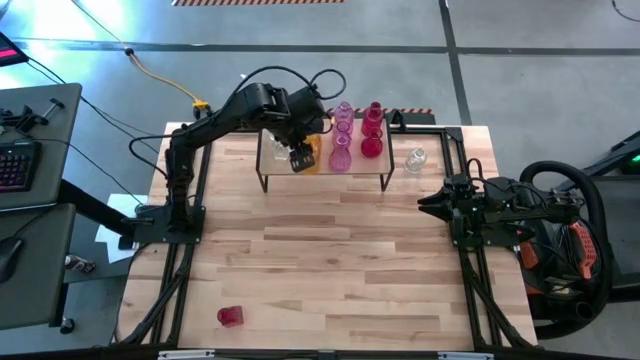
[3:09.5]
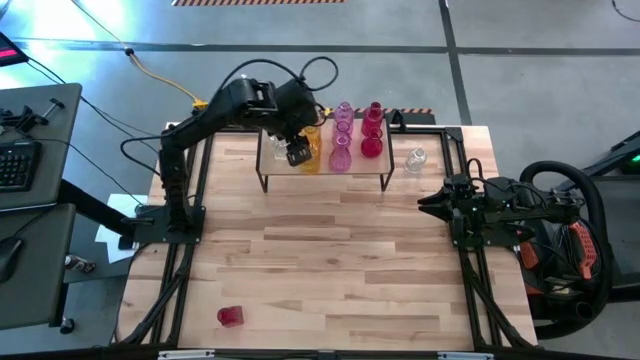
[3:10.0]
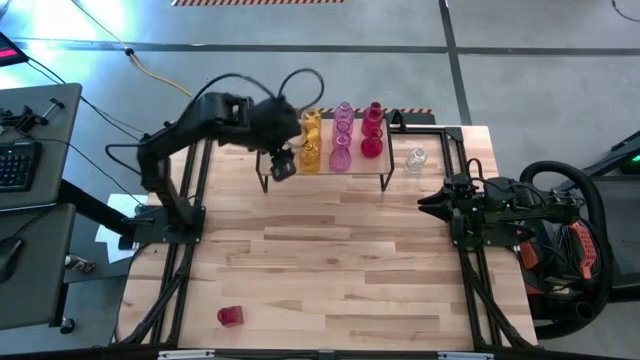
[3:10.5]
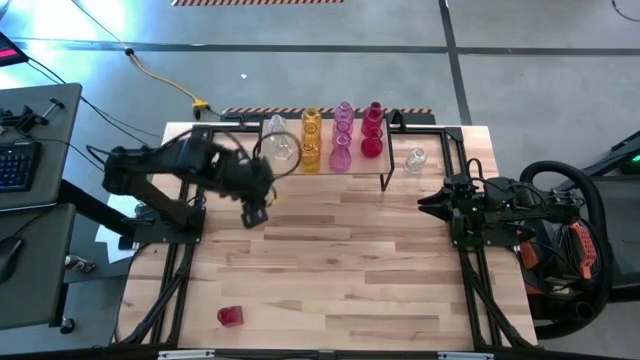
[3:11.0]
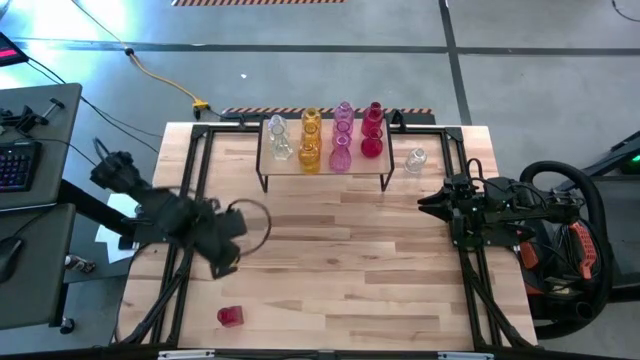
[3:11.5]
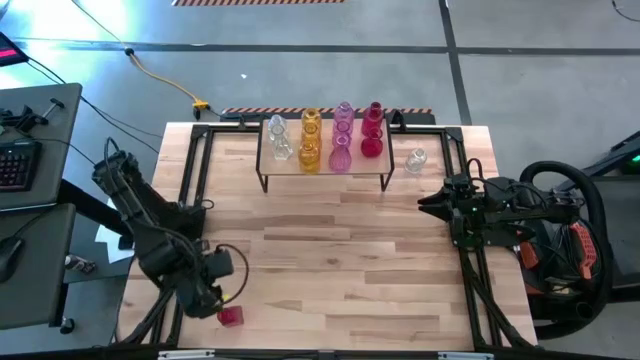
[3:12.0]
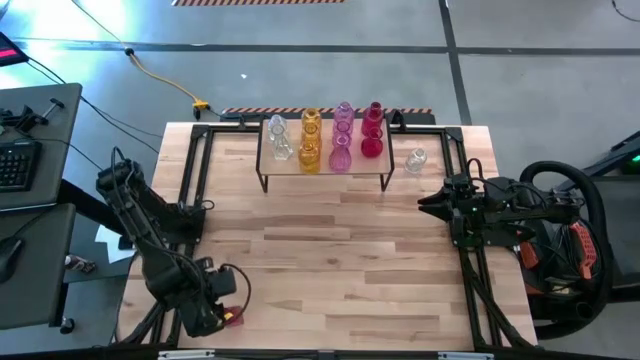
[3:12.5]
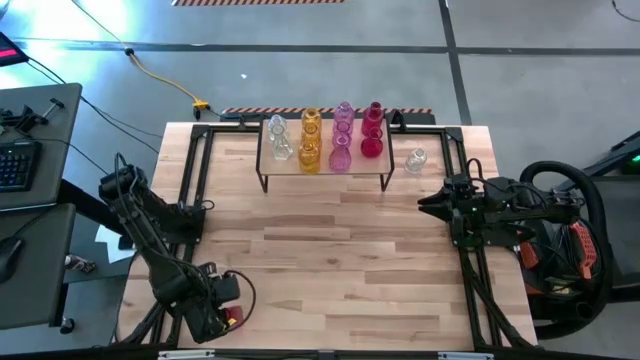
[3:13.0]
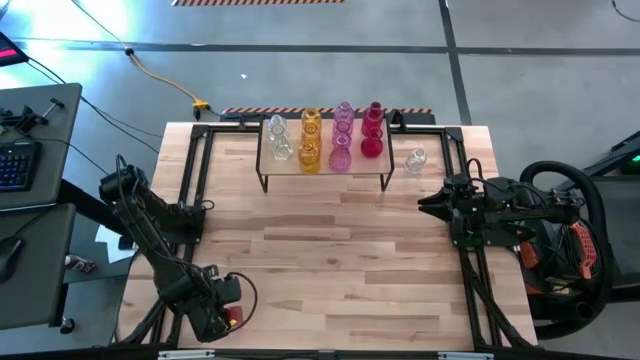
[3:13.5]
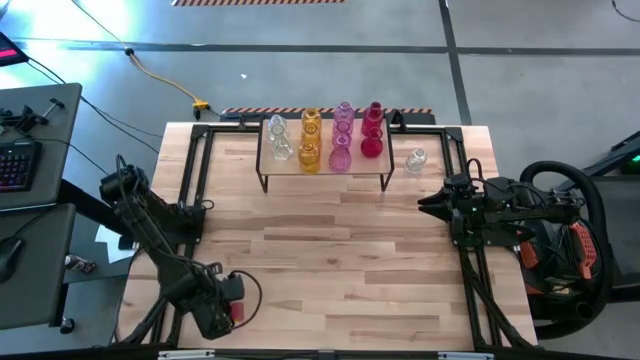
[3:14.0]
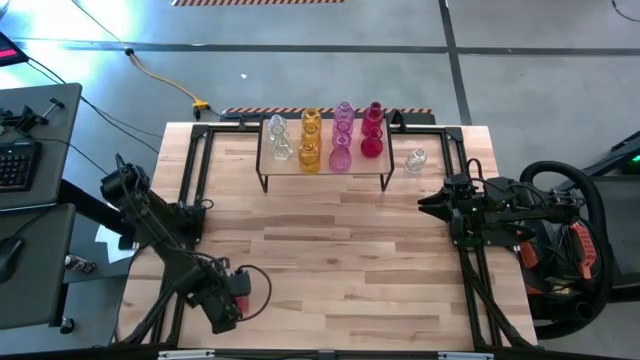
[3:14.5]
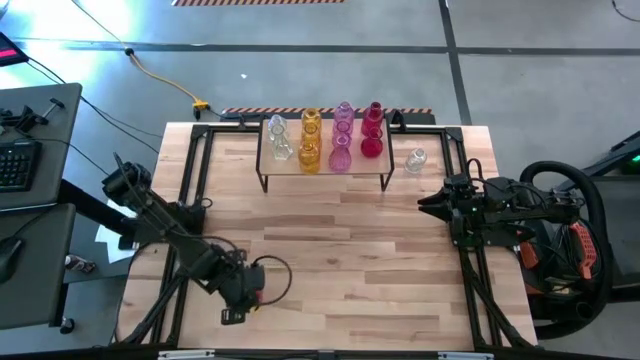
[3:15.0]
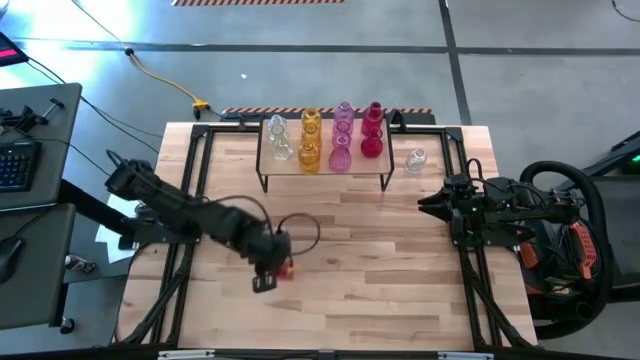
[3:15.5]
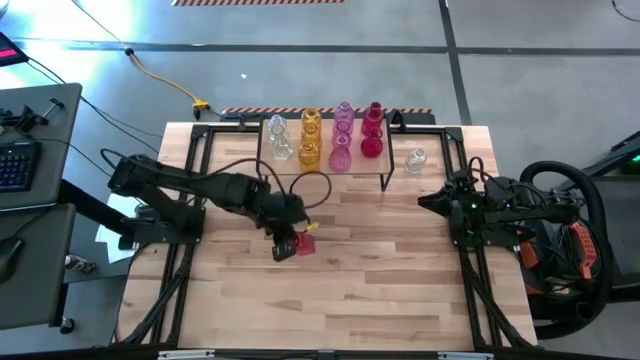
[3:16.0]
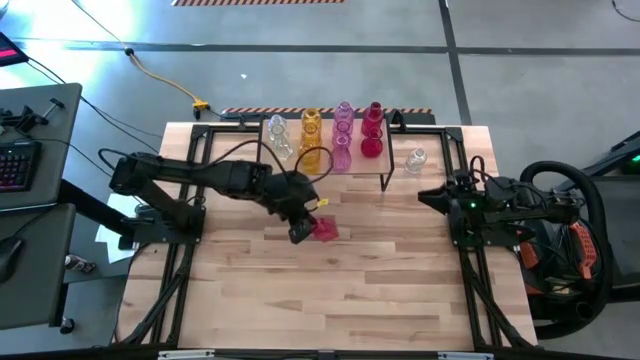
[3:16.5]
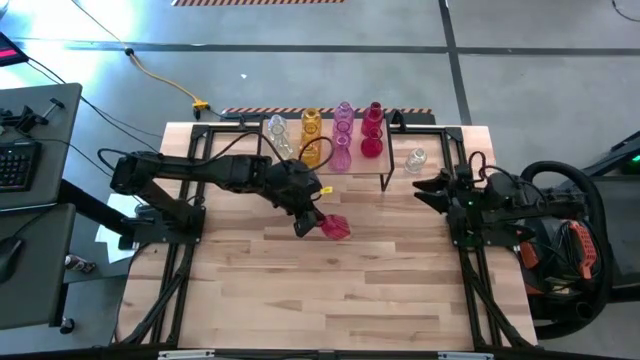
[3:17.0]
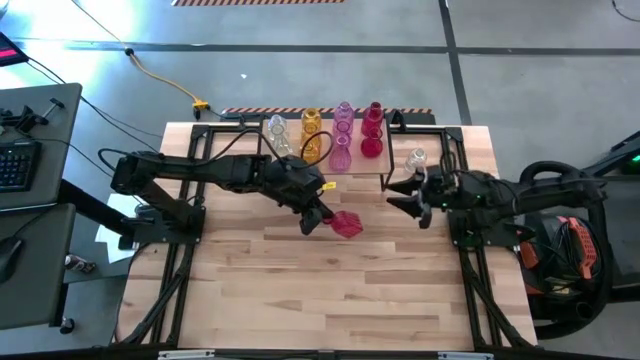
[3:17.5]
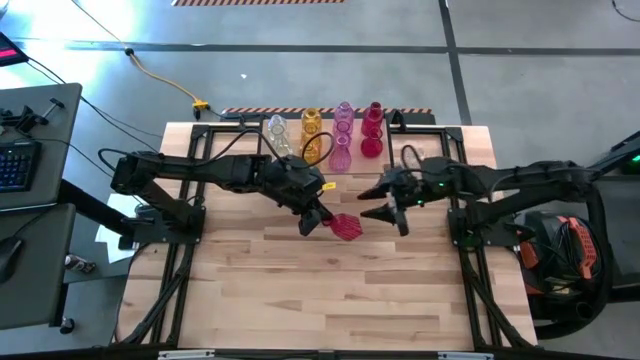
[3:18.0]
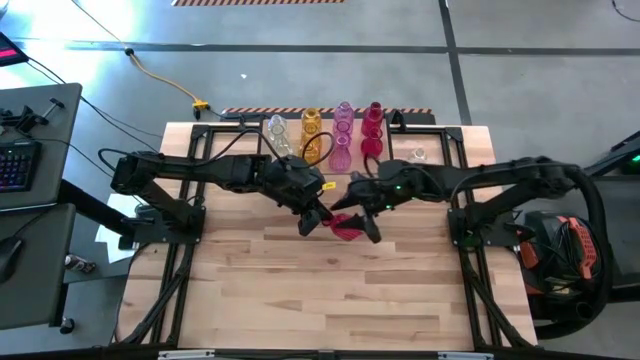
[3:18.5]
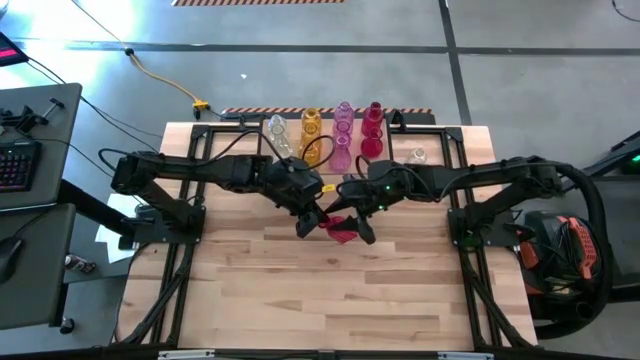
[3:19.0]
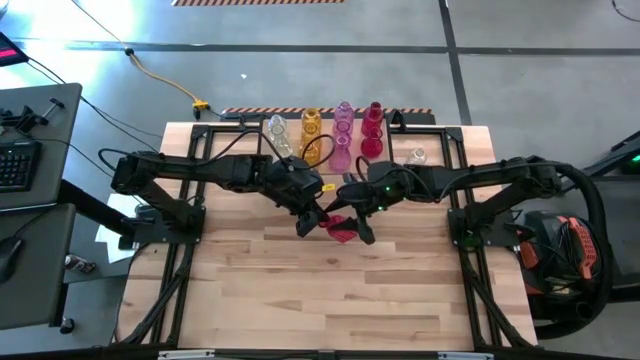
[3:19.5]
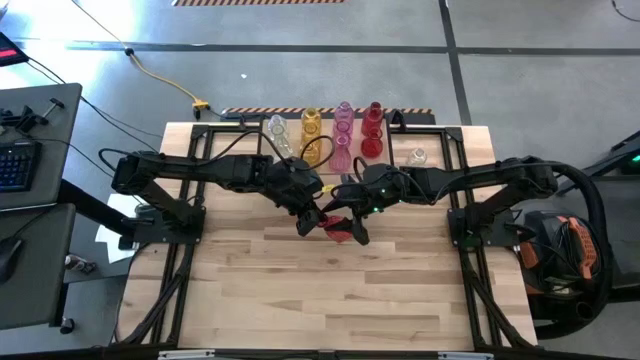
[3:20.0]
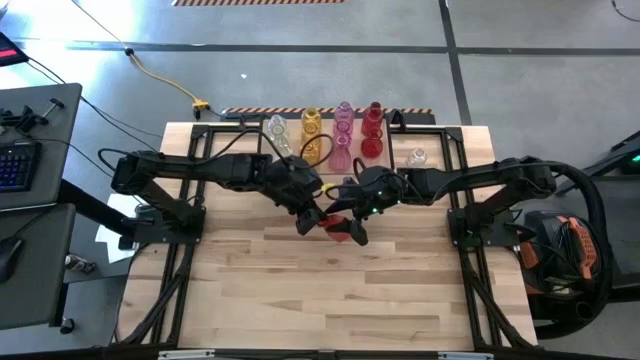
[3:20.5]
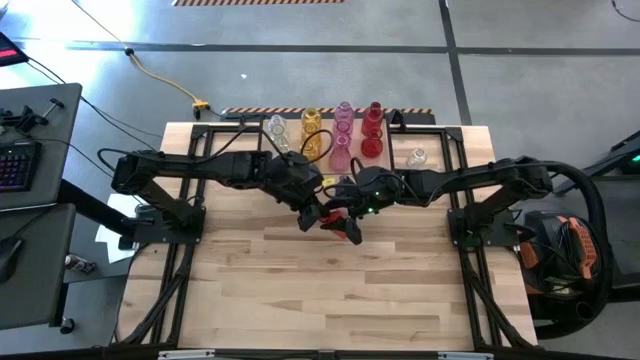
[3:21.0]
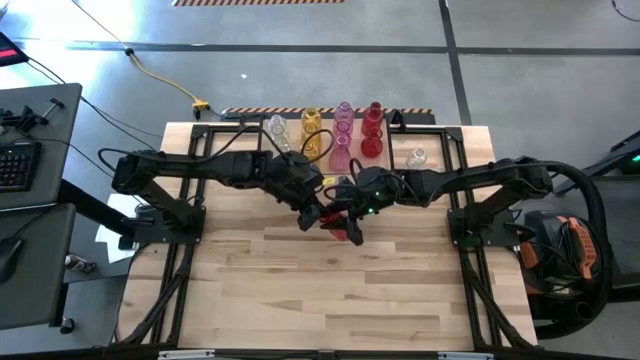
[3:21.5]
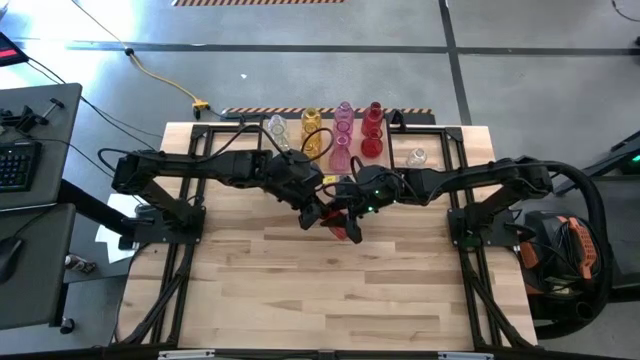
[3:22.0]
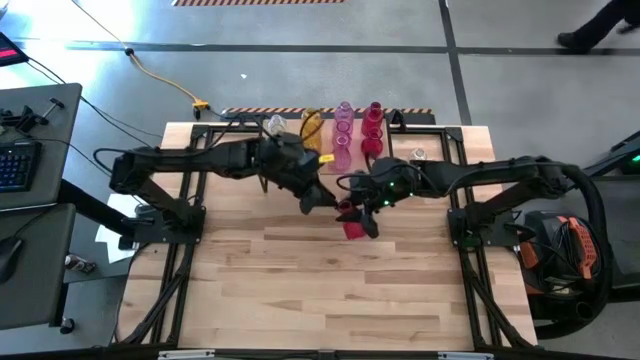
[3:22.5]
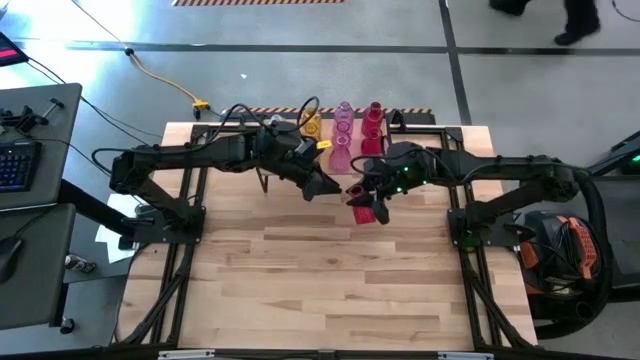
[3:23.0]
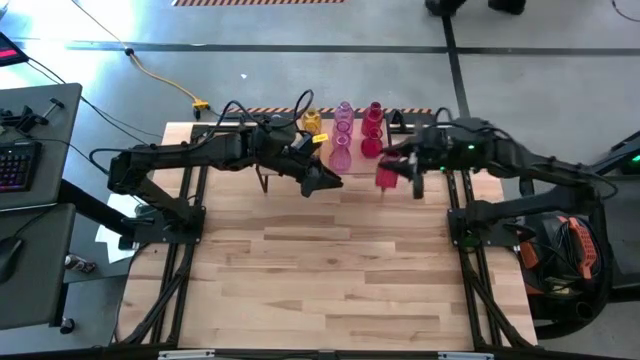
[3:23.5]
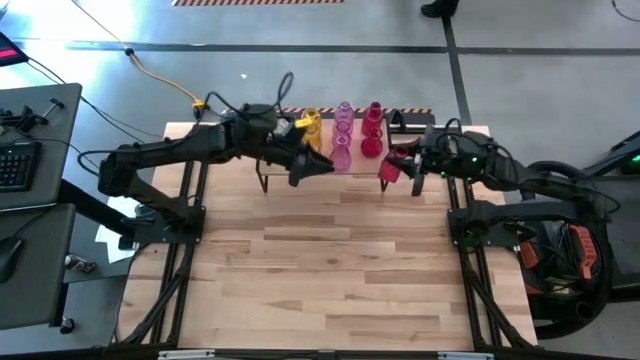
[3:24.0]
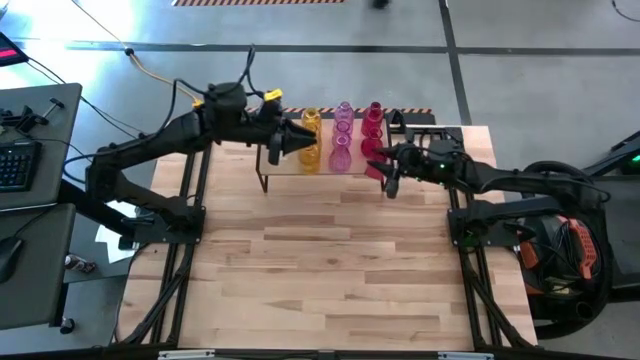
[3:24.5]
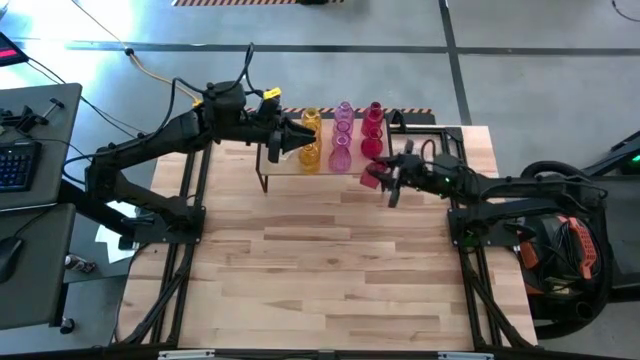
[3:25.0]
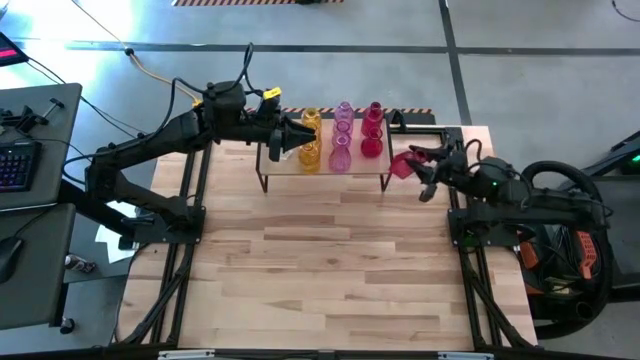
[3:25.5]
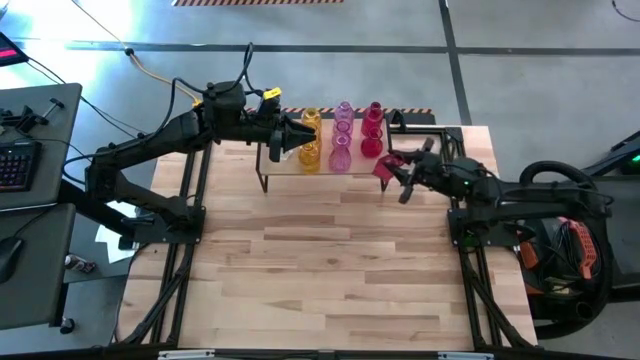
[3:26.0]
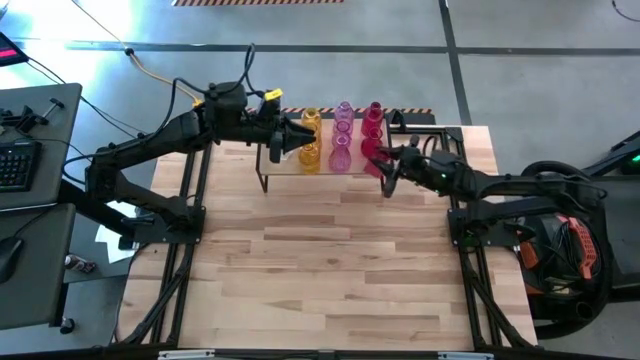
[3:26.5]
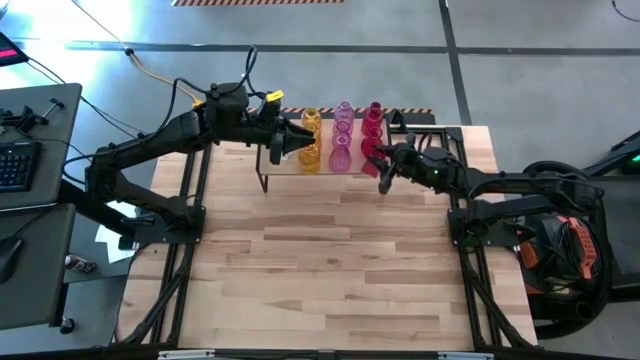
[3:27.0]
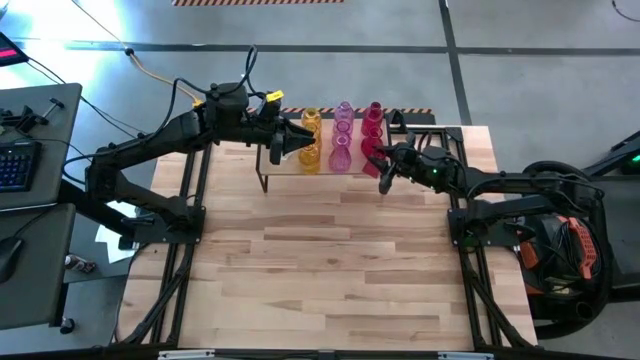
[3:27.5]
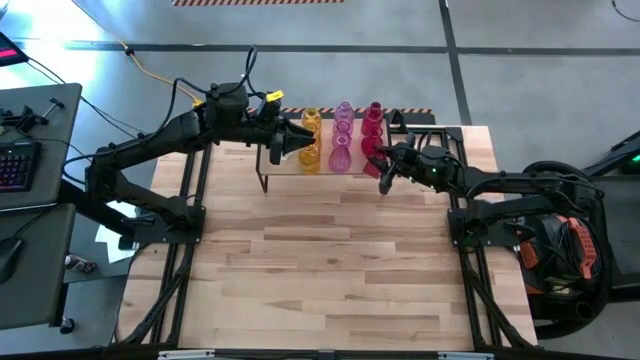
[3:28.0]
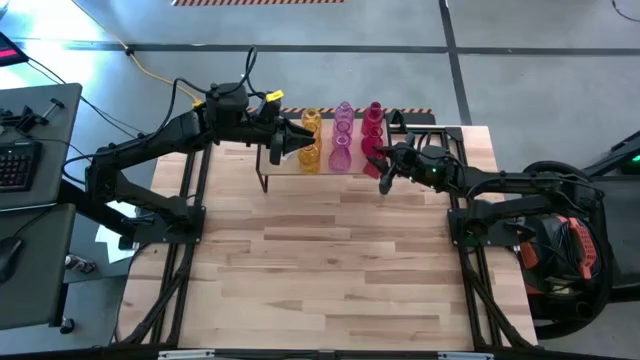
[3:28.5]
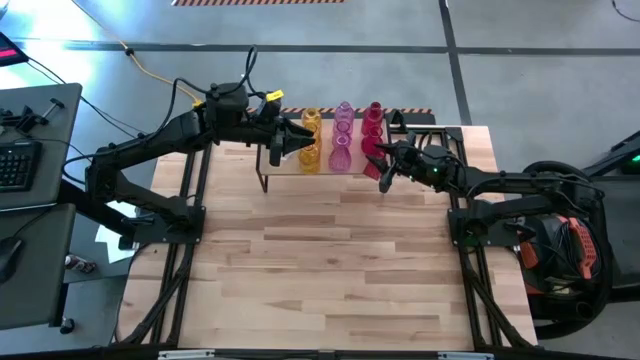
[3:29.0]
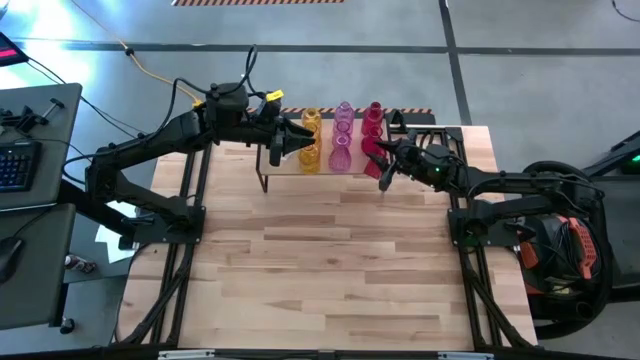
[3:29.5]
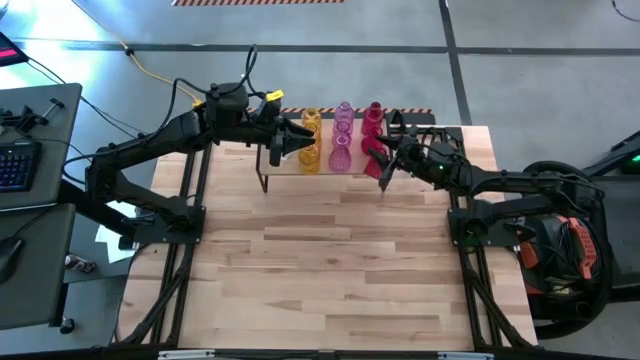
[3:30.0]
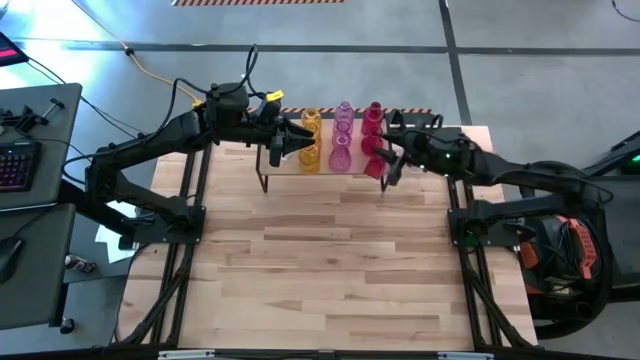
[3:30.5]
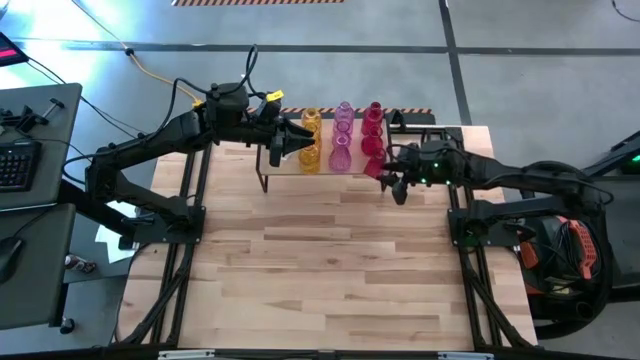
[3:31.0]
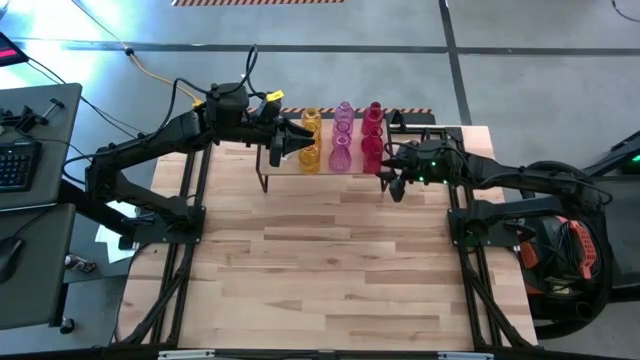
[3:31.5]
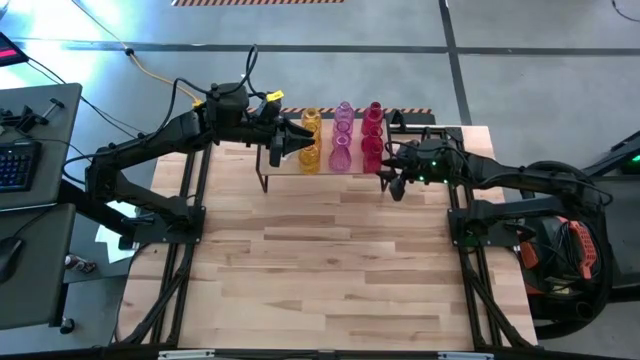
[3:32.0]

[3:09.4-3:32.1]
Task: sort vases onto shelf
Put the red vase aligned with the other red vases on the shelf
